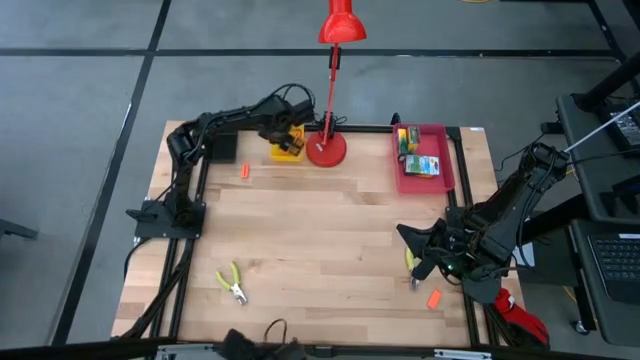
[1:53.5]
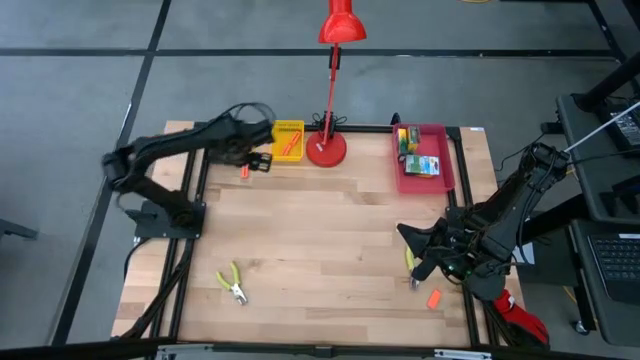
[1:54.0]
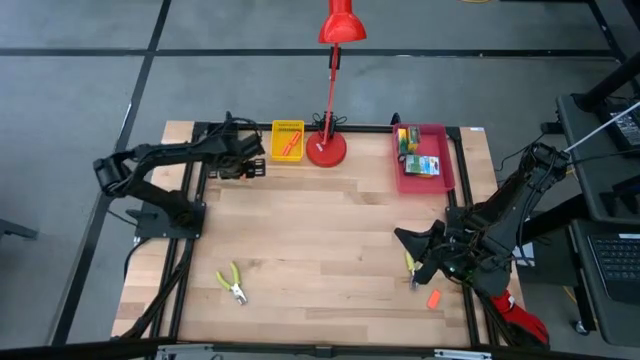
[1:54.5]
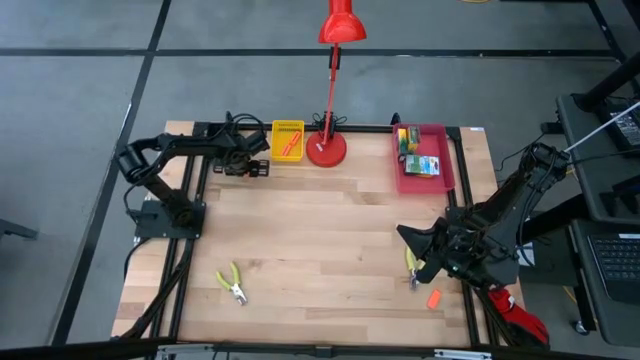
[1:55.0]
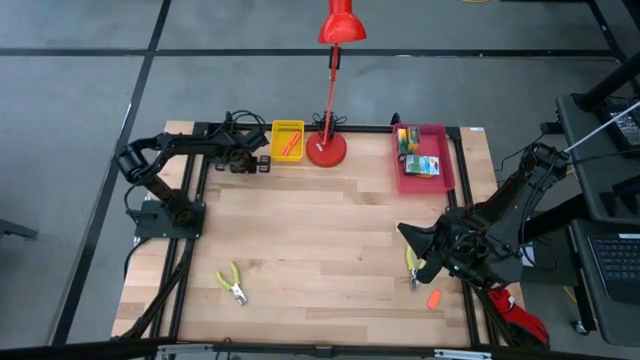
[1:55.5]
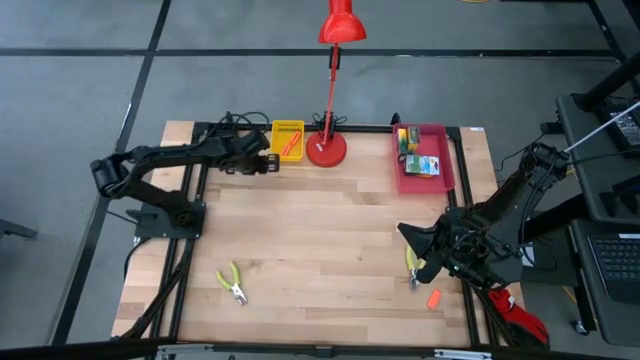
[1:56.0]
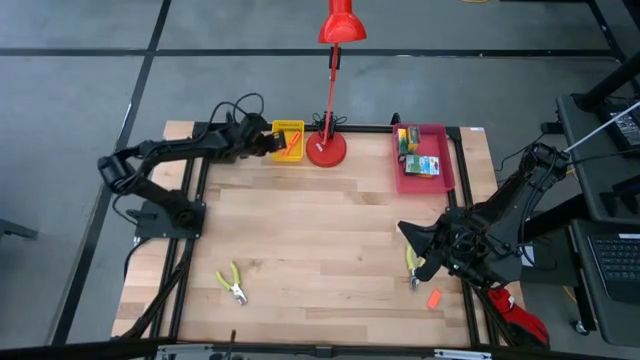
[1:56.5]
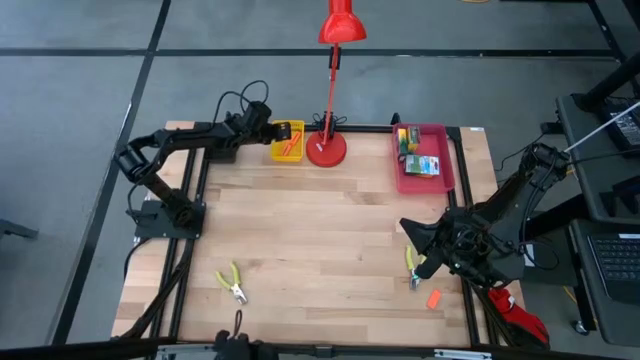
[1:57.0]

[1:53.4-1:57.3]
Task: Pick & Place School Supplies
Put the orange eraser into the yellow bin

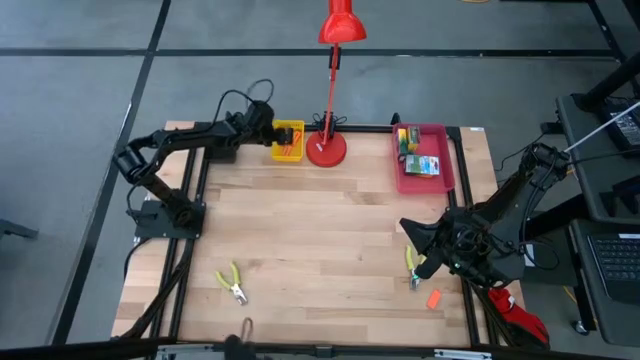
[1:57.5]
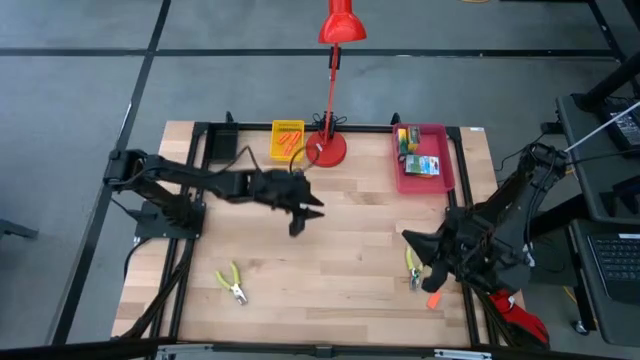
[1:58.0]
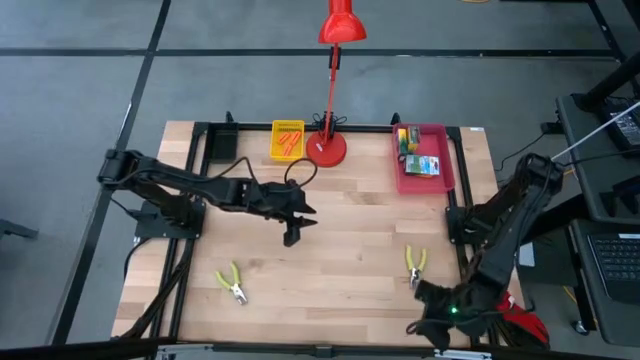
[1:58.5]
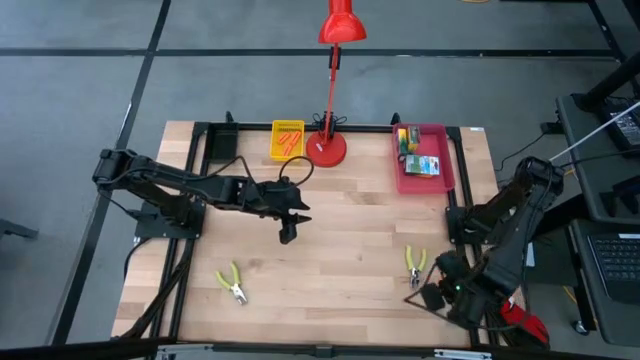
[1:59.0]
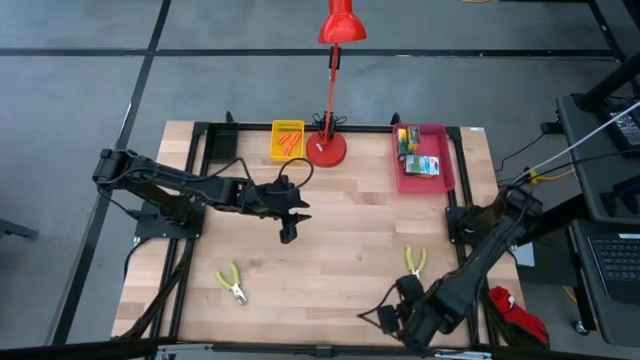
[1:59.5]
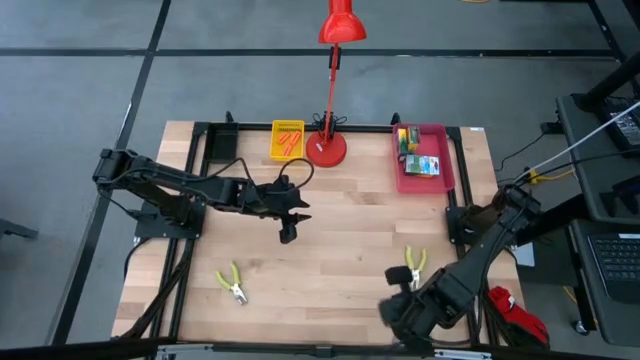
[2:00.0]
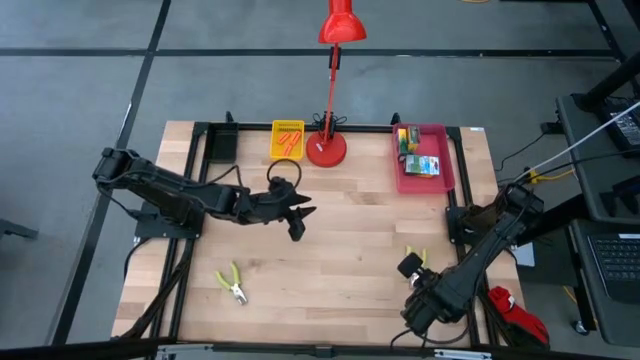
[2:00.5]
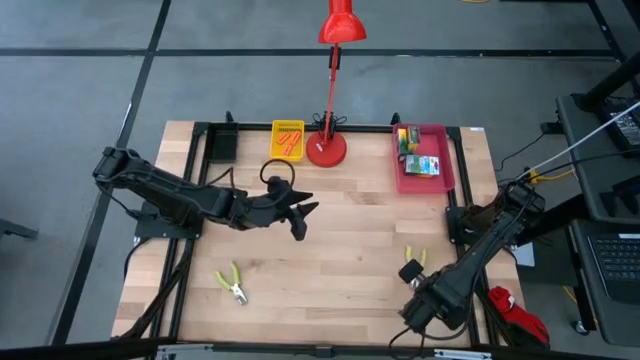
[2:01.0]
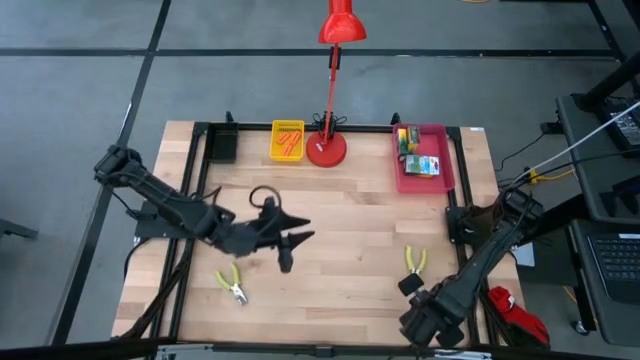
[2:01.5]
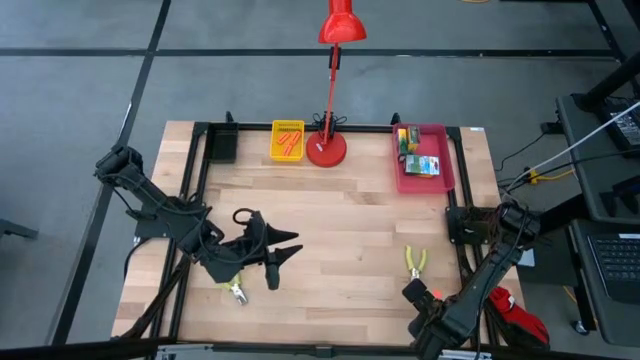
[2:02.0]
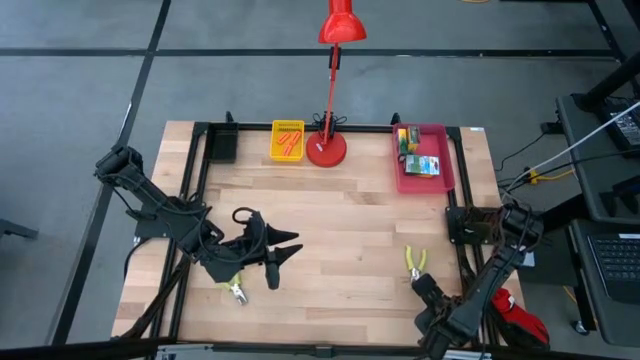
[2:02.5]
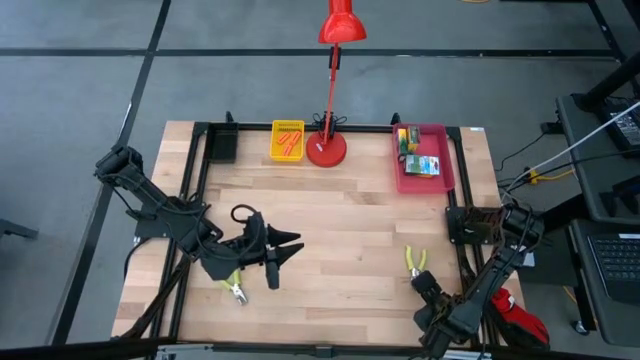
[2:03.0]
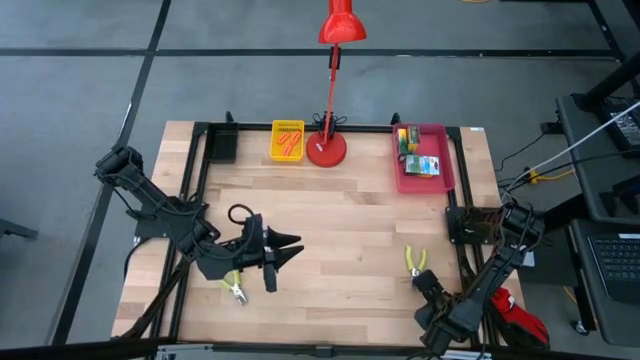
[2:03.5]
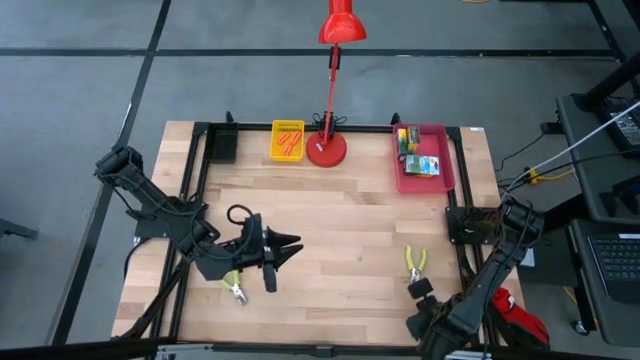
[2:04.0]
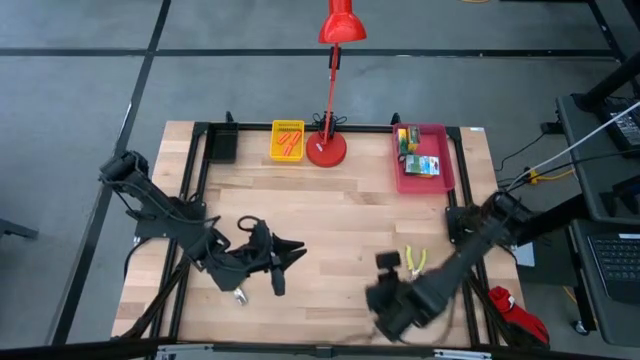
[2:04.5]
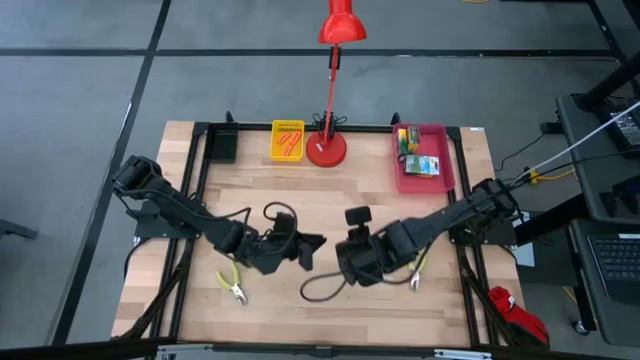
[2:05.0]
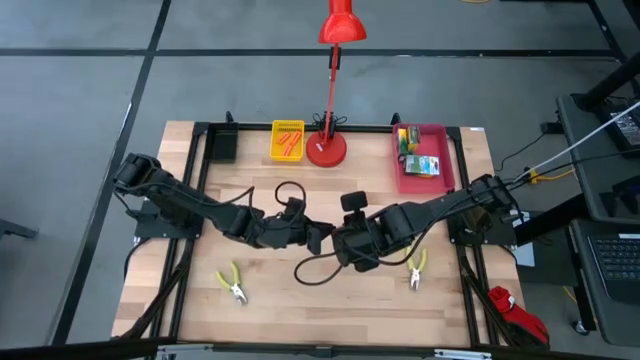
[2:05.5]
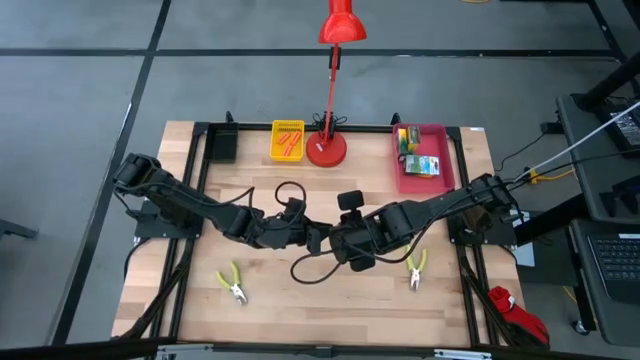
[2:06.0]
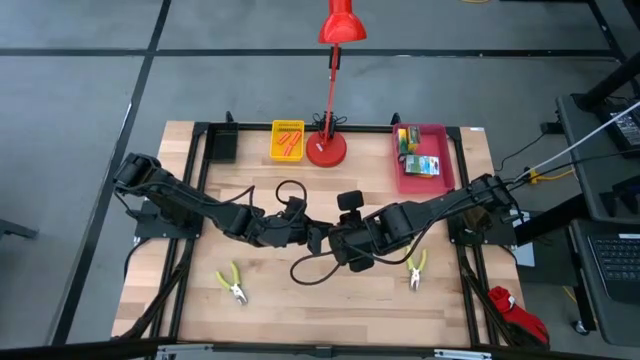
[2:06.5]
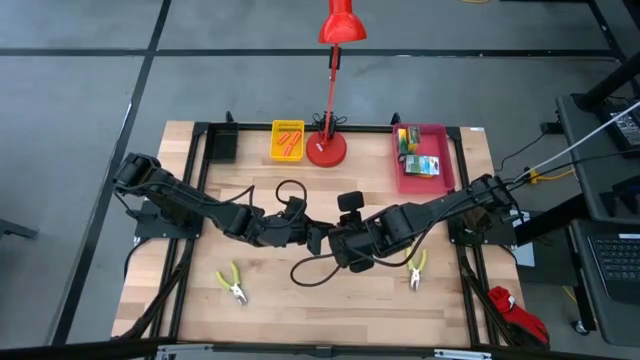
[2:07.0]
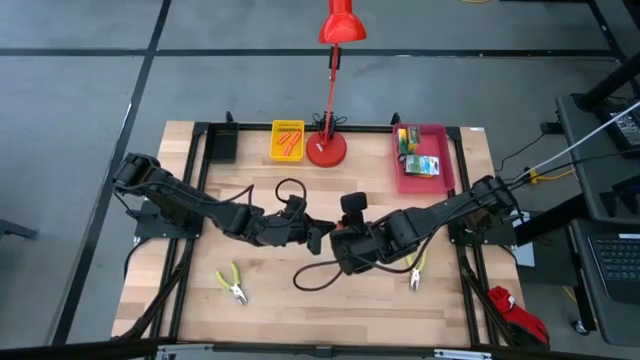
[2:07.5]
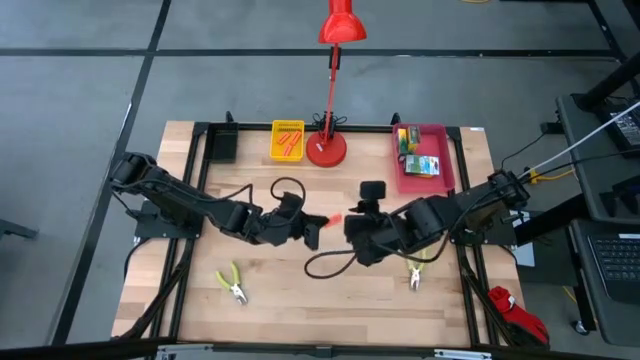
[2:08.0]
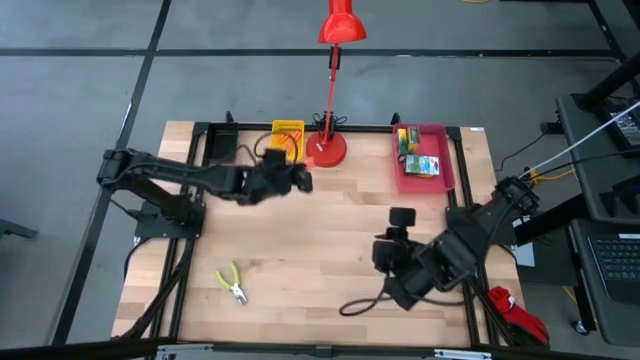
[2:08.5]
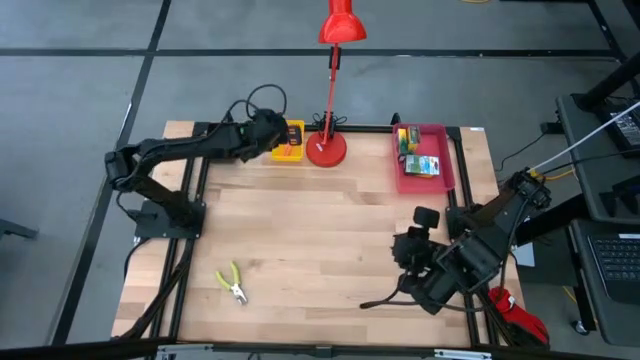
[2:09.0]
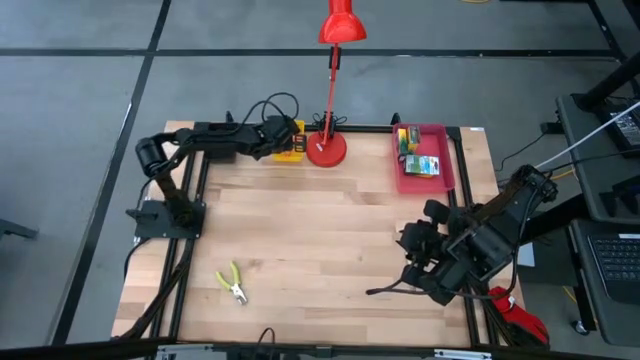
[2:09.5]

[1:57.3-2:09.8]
Put the orange eraser into the yellow bin

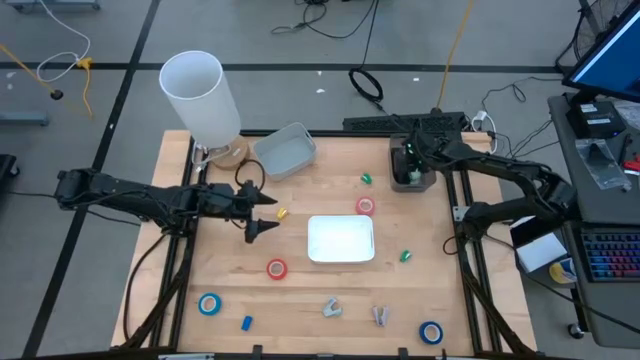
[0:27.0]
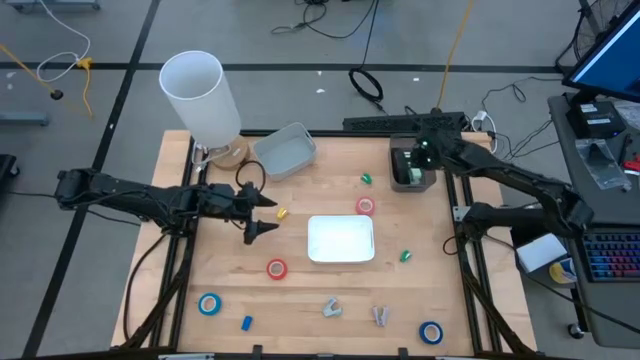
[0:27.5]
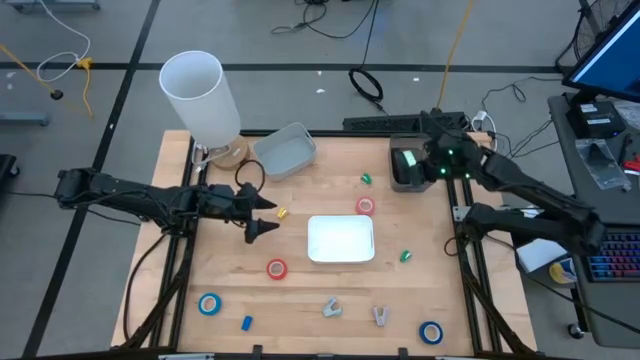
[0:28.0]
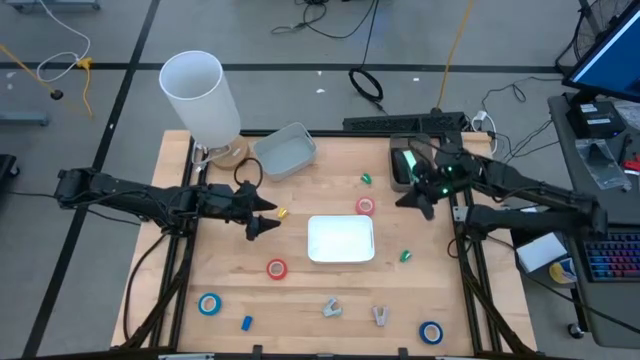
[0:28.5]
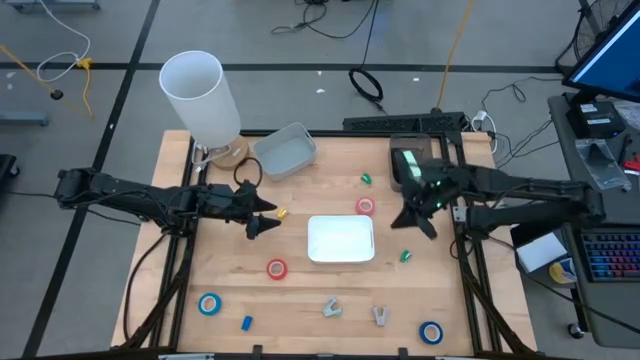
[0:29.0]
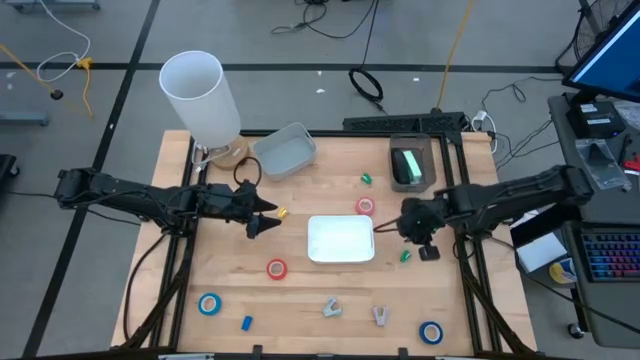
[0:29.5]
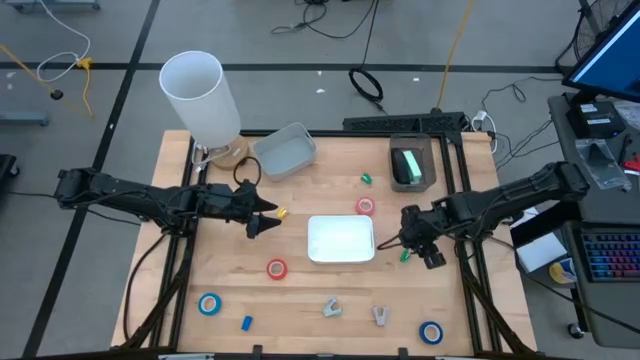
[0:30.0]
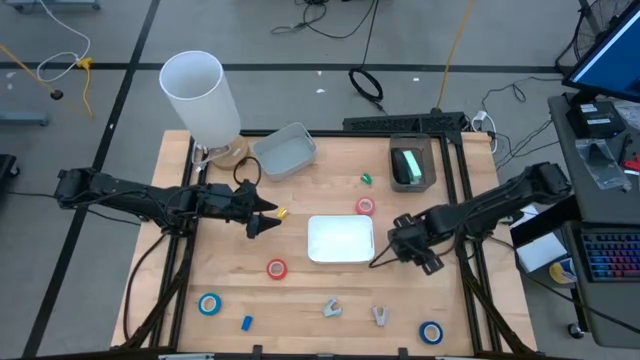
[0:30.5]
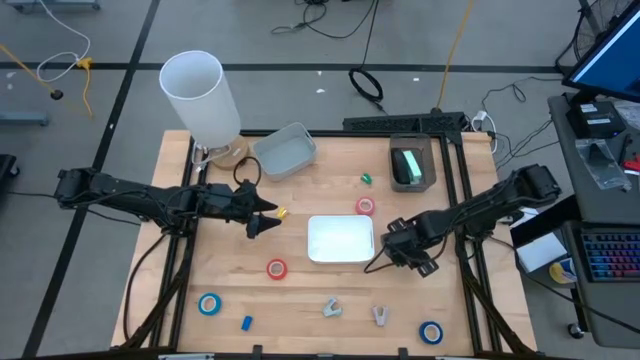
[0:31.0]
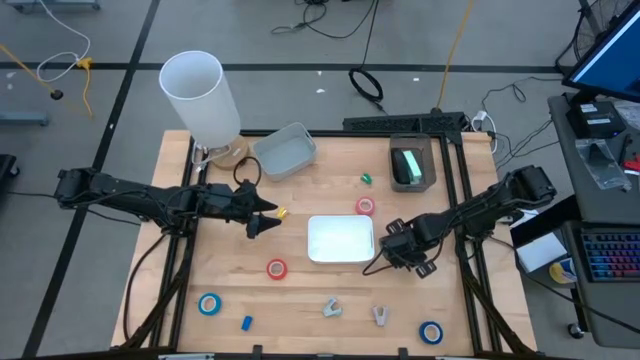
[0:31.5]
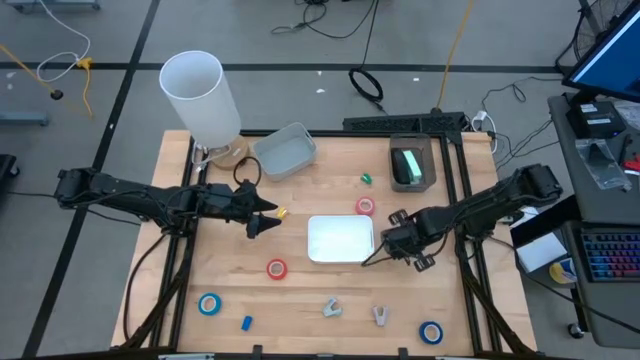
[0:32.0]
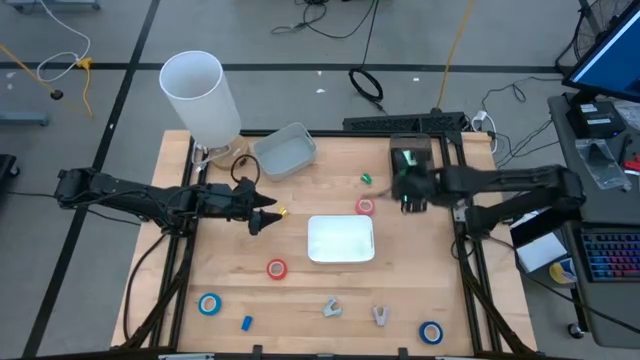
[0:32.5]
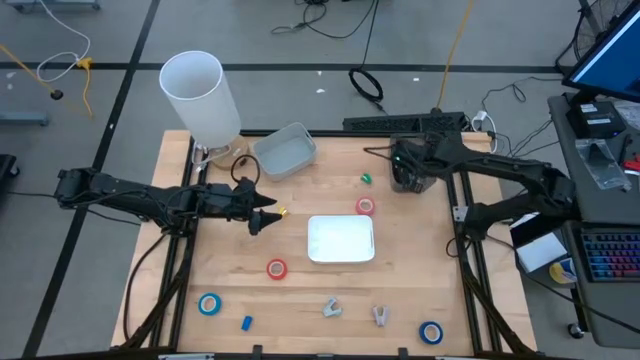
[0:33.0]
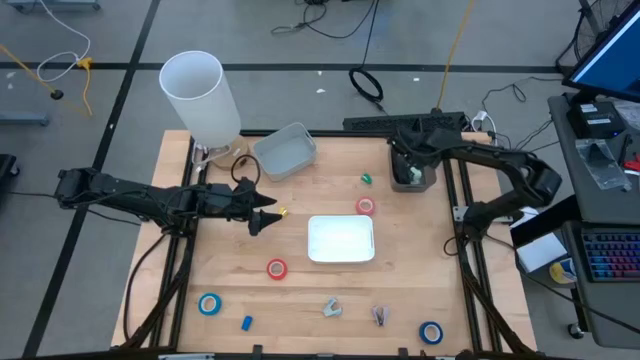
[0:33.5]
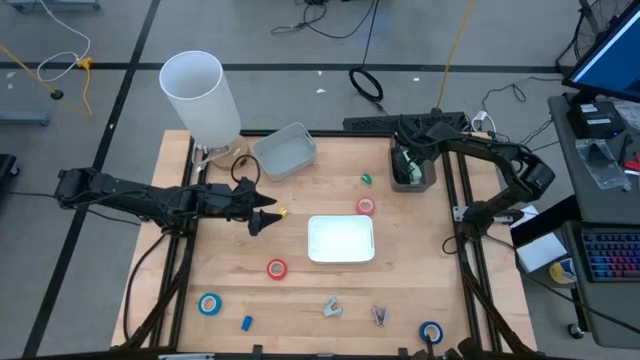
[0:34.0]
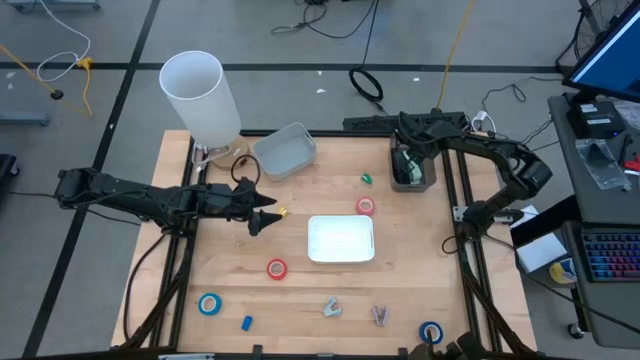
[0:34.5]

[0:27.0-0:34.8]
Task: Pick and place Stapler, Stapler remover, tape
Put the bottom green stapler into the black bin
